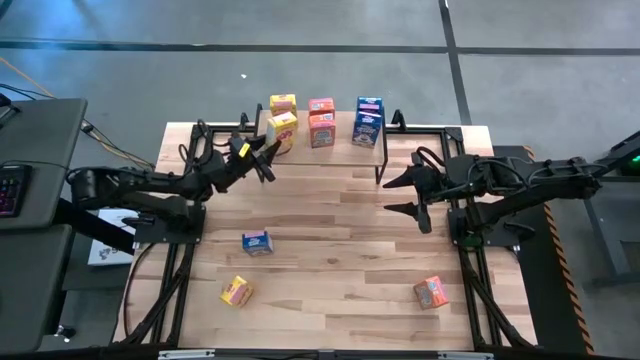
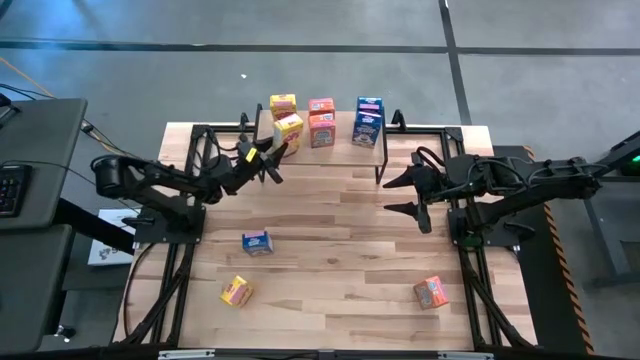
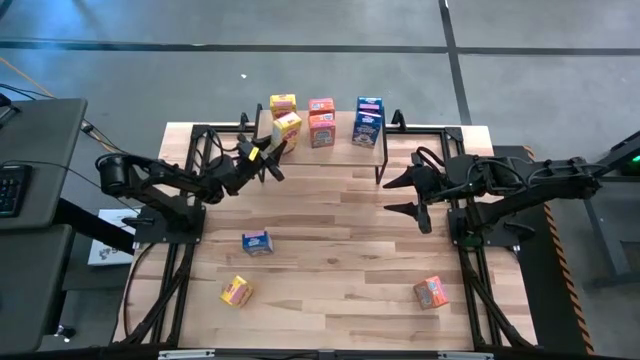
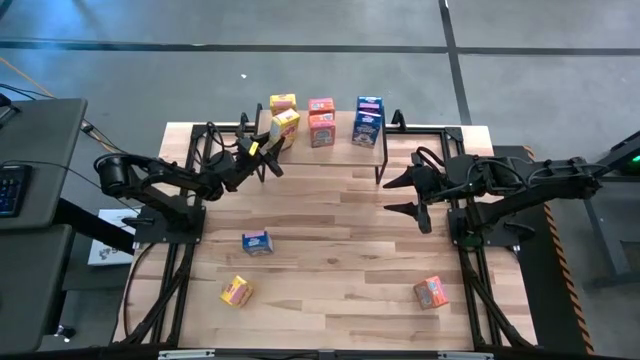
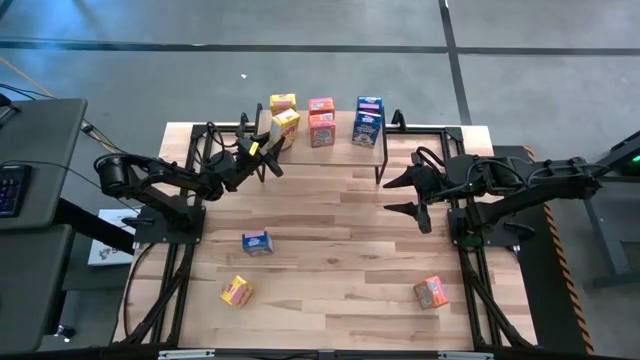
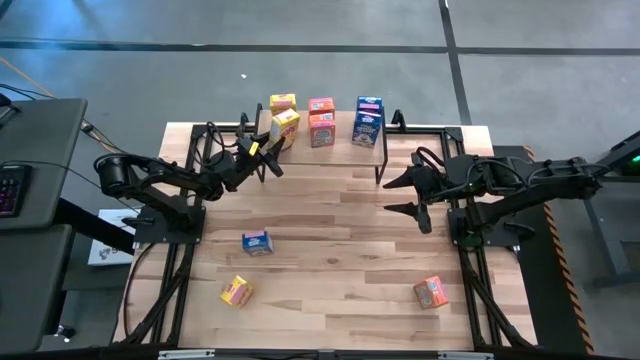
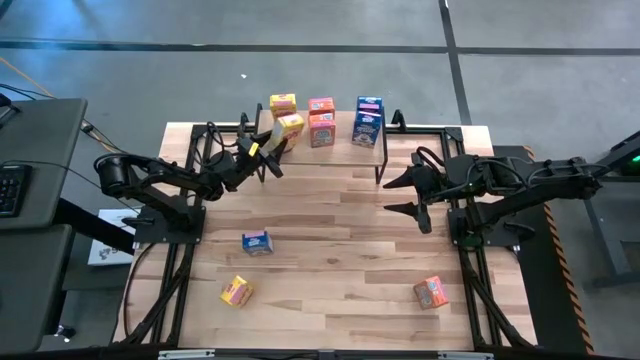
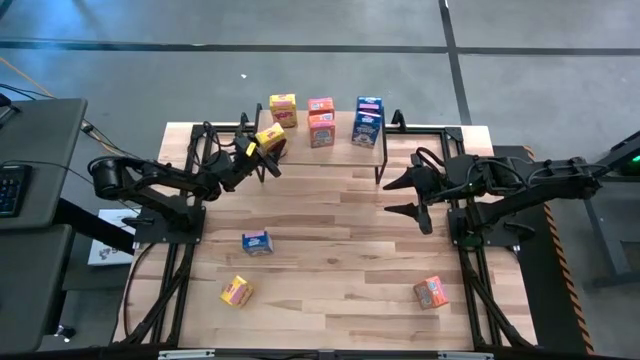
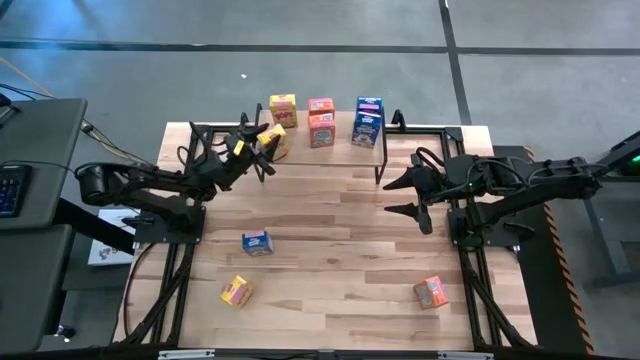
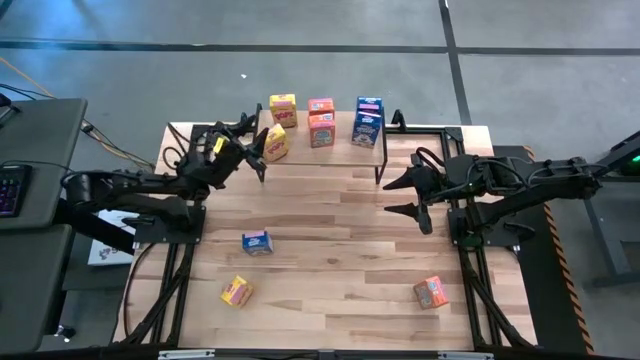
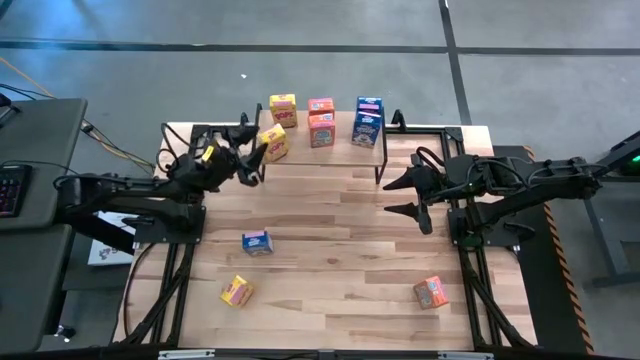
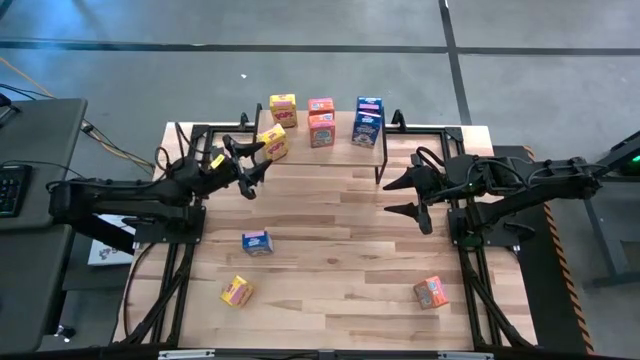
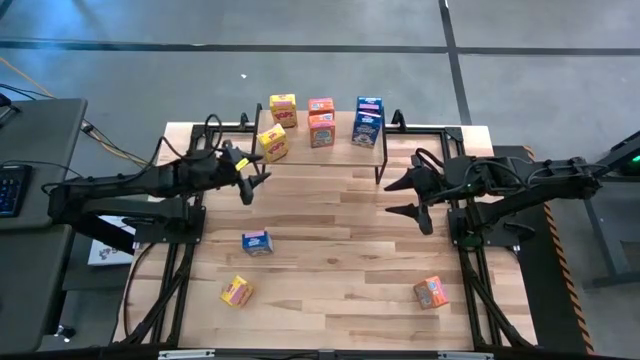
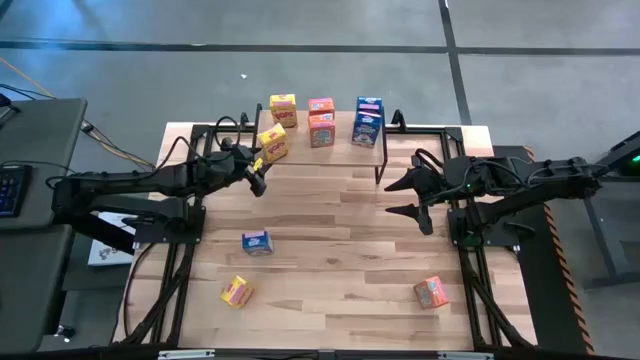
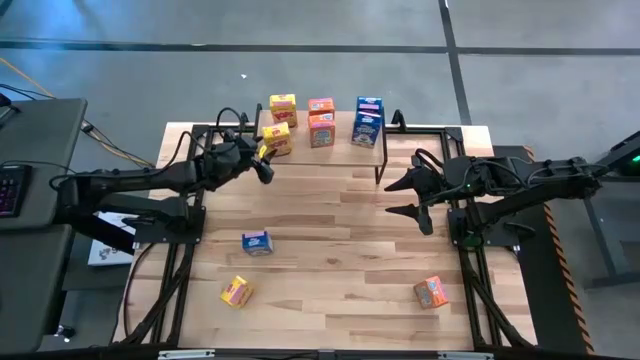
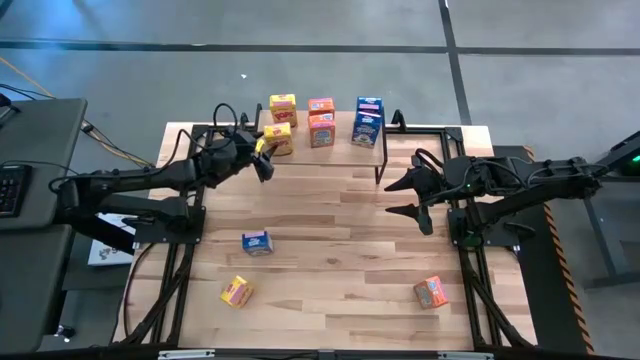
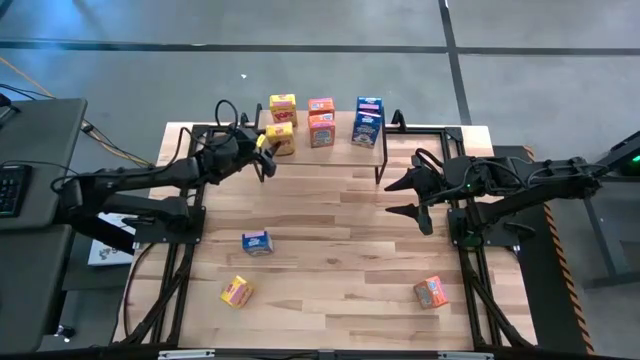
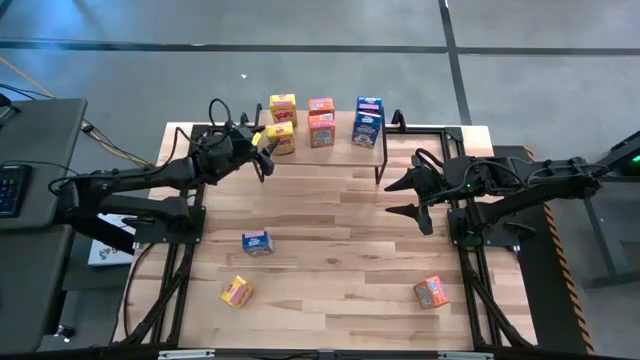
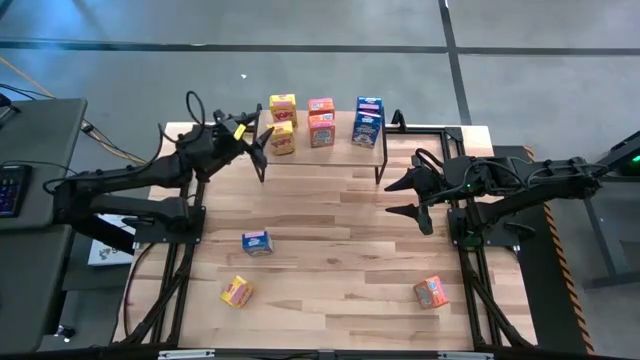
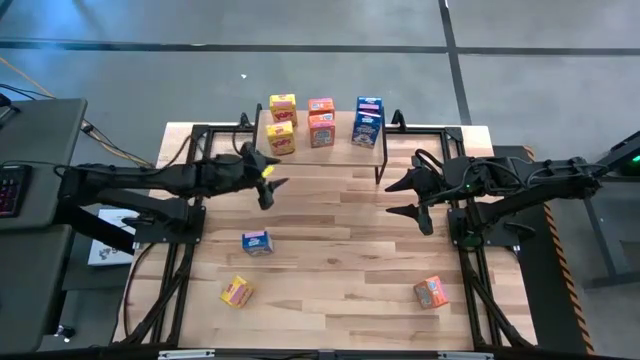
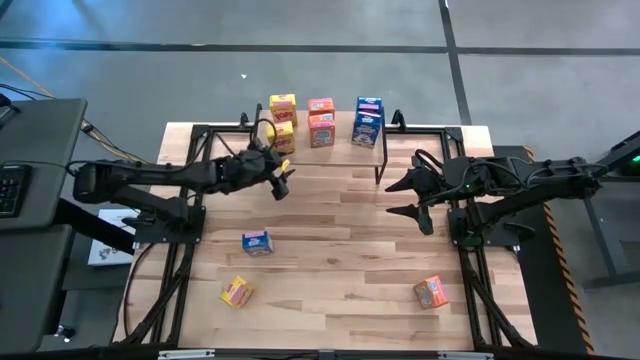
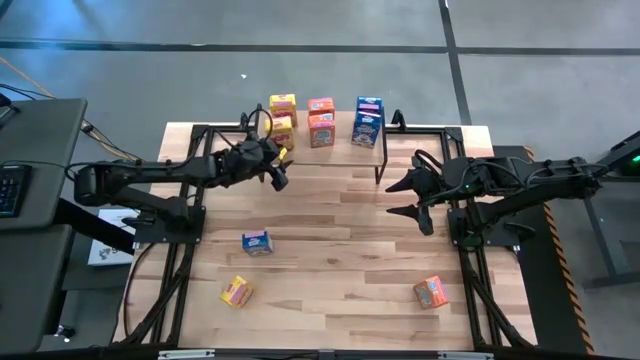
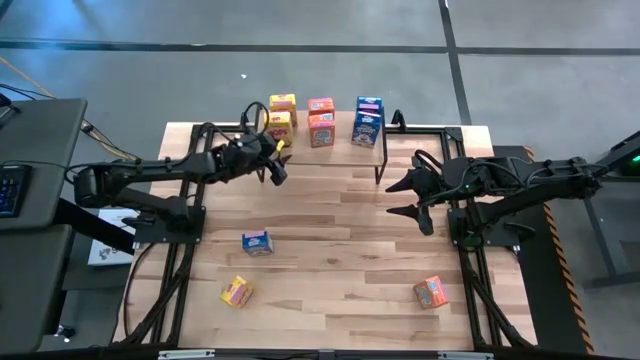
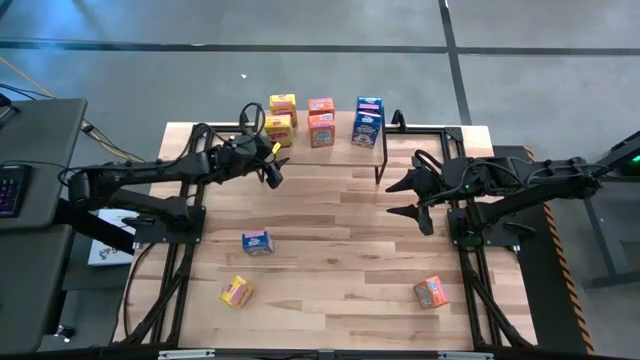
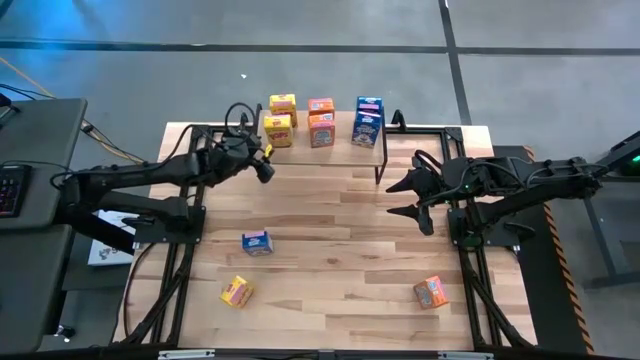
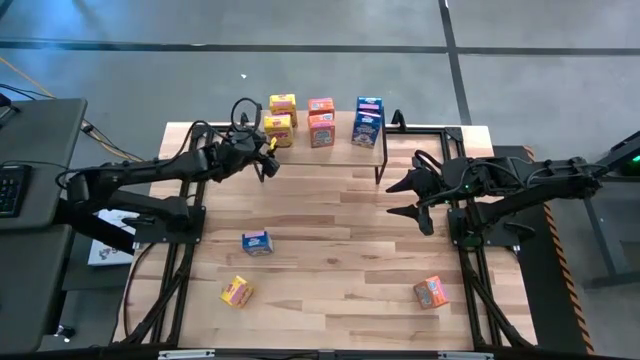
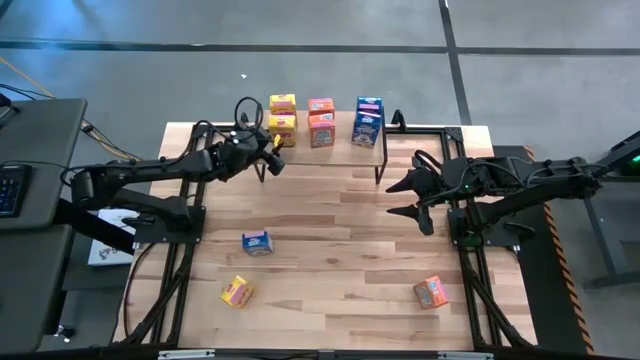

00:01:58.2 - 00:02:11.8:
Task: Stack cereal on shelf
Put the right yellow cereal box on the shelf aligned with the other yellow cereal box
